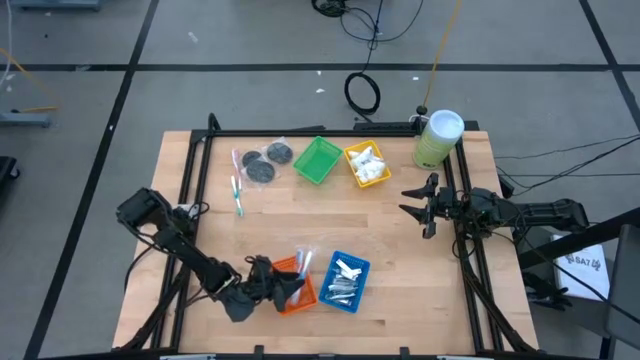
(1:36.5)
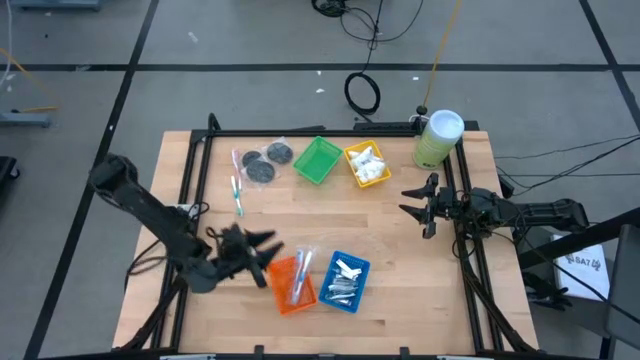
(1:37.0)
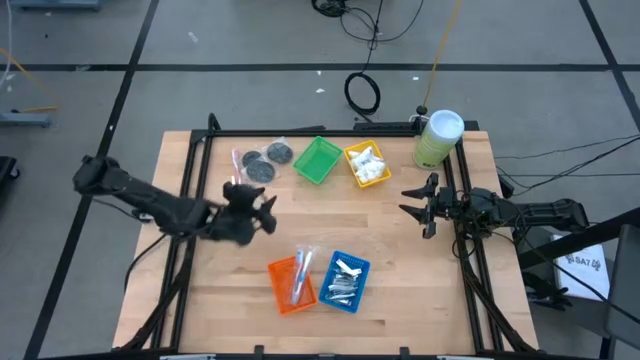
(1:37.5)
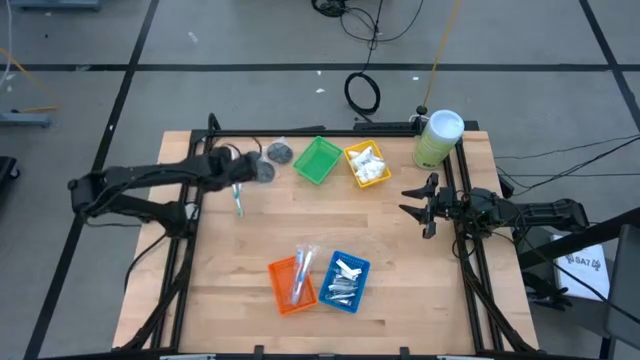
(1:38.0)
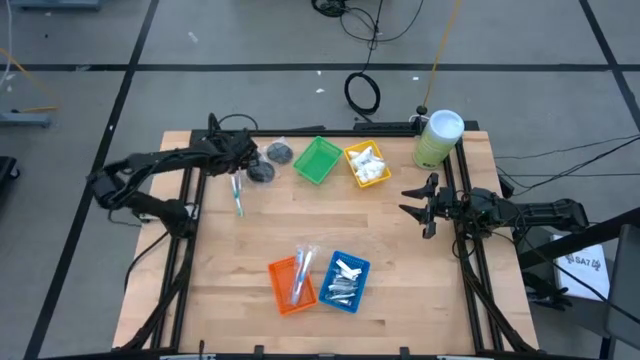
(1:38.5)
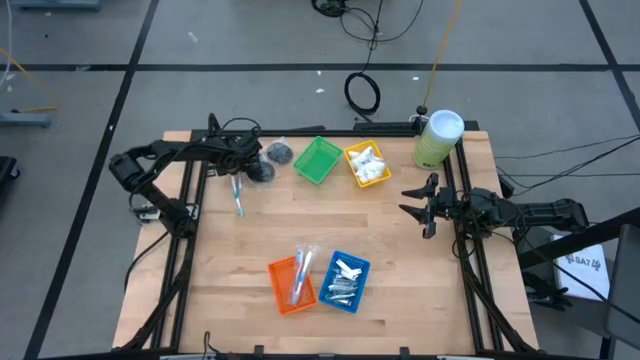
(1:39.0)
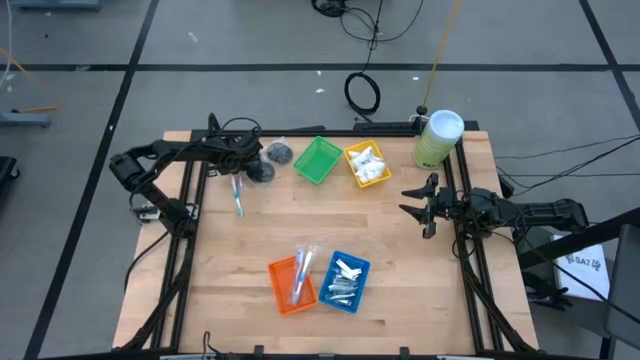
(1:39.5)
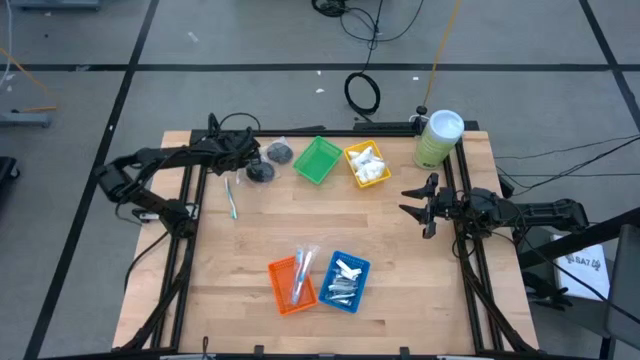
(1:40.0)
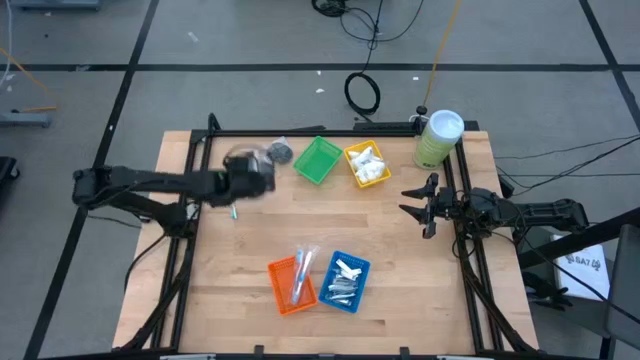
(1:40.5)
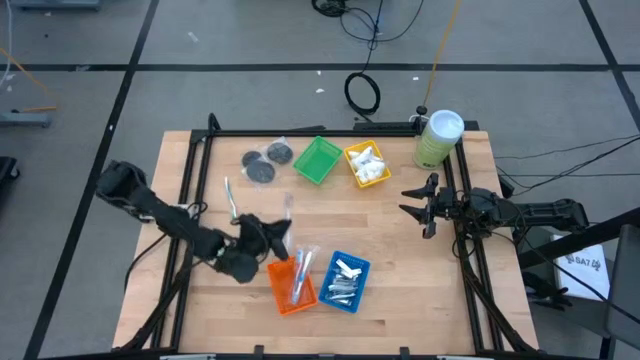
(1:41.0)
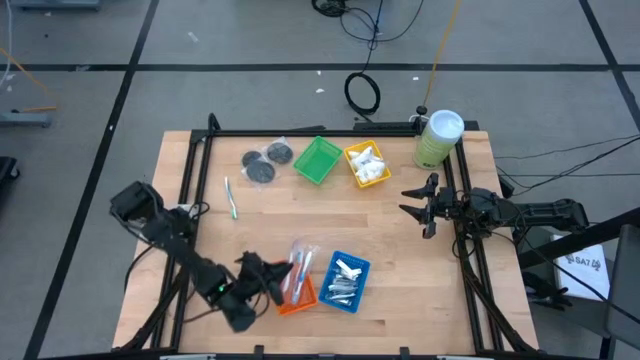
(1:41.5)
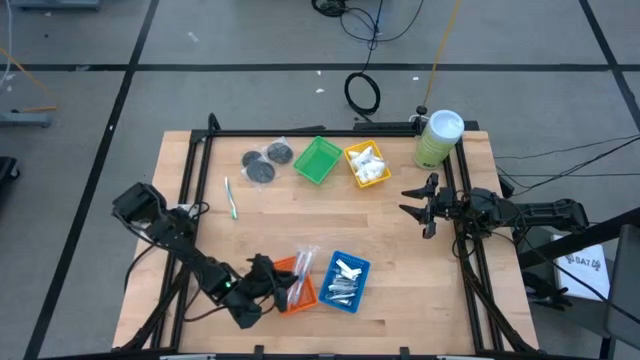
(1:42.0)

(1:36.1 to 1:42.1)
Task: Pick & Place Travel size toiletries
Put the red toothbrush into the orange bin

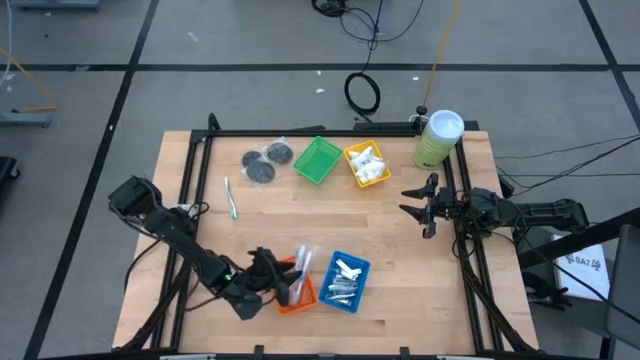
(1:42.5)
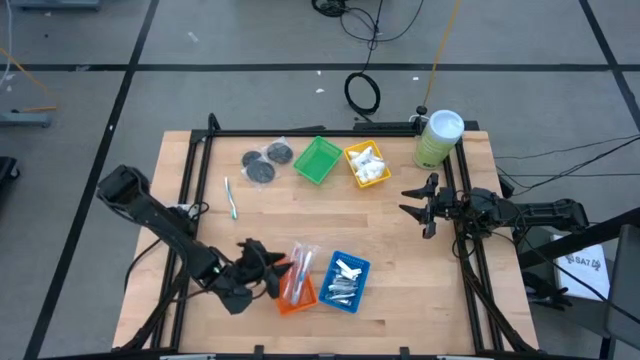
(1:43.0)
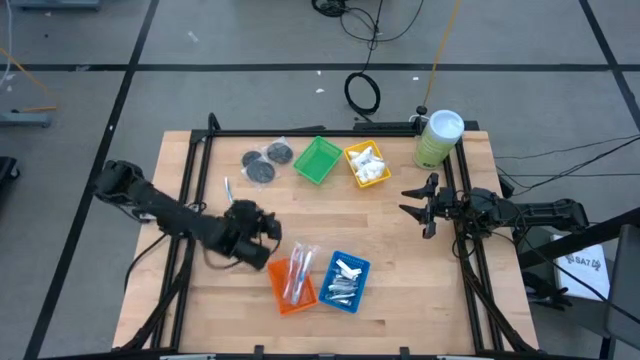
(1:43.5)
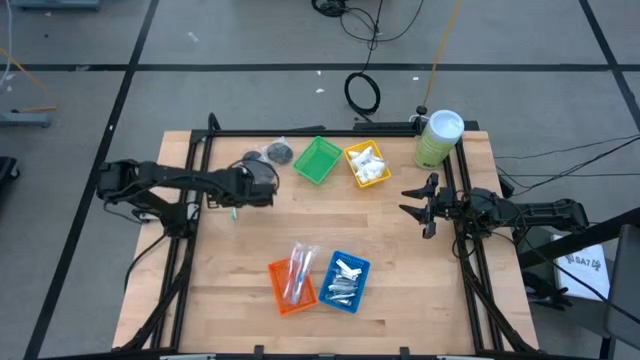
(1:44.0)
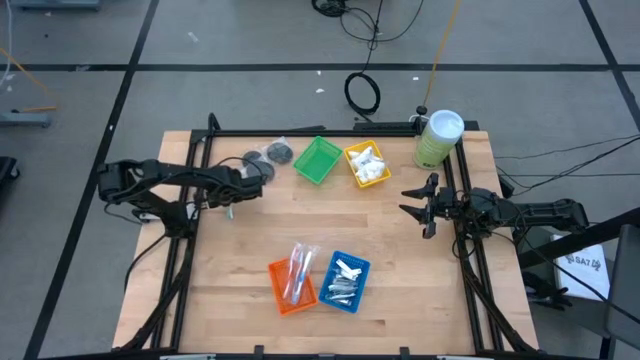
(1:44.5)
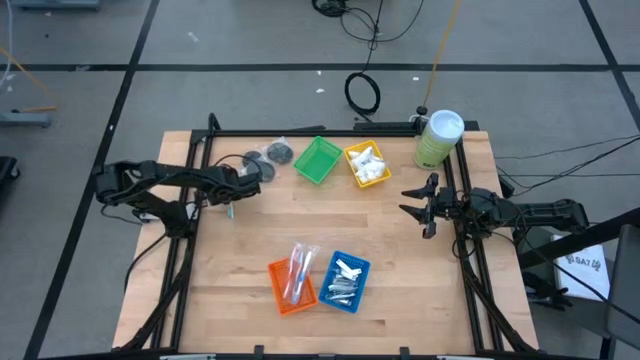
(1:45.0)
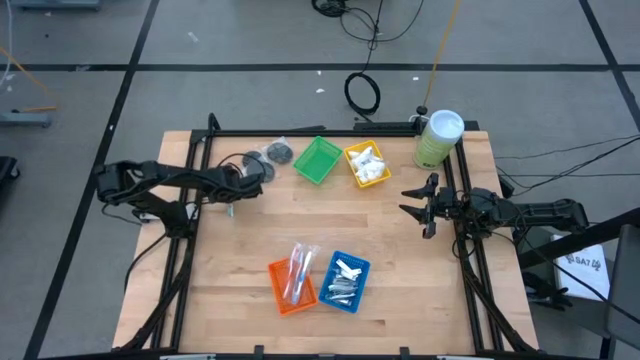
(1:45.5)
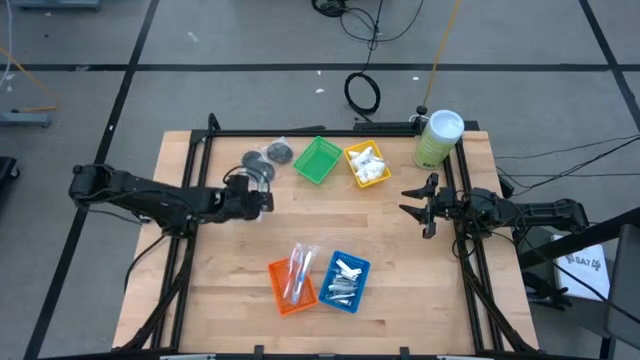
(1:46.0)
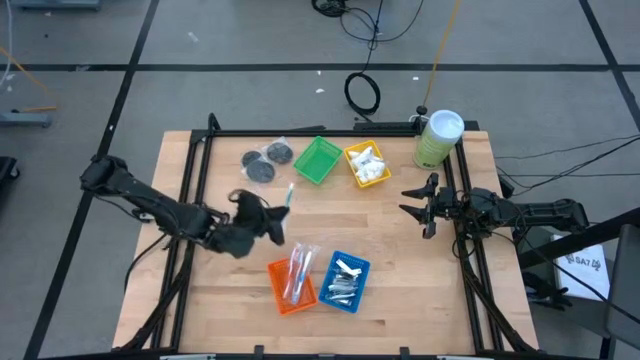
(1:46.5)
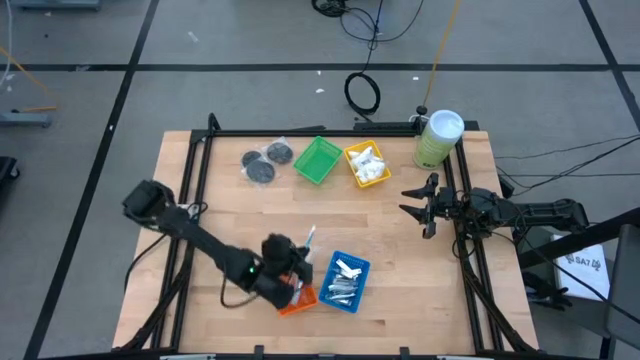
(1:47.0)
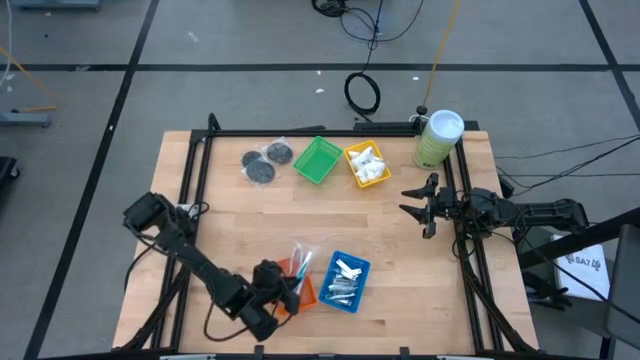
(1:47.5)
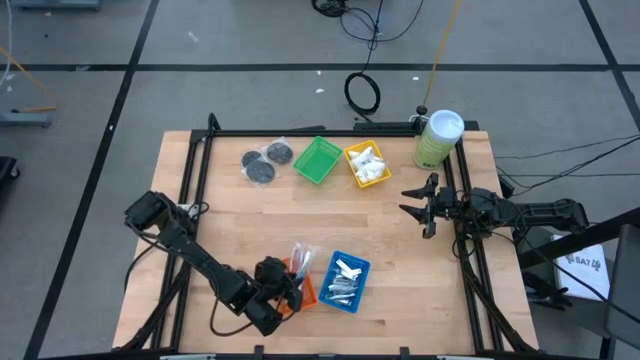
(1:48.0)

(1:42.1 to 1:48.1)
Put the green toothbrush into the orange bin

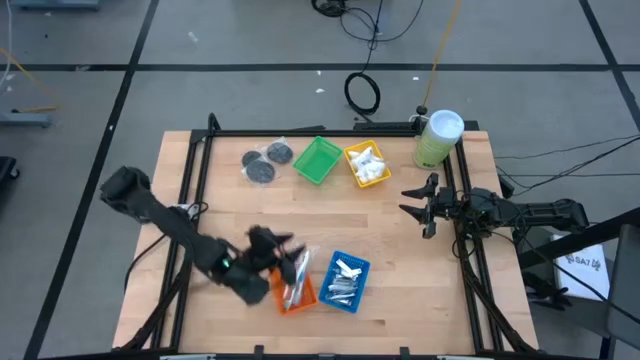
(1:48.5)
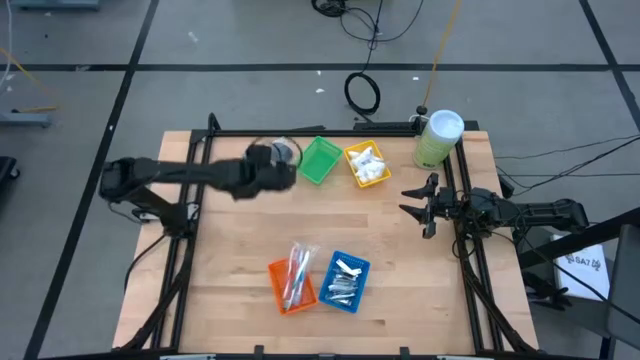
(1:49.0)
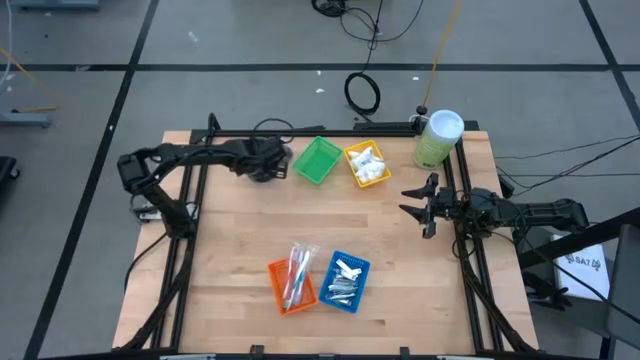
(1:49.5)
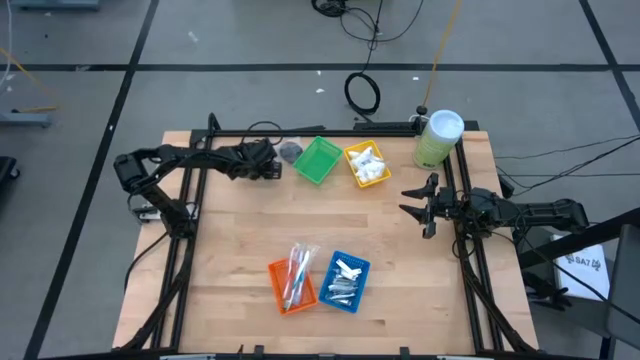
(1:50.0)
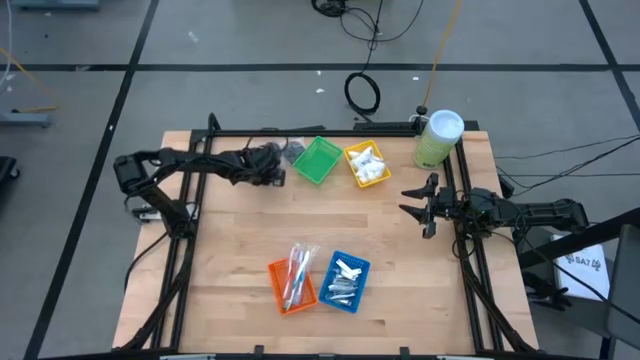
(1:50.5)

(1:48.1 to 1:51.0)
Put the black hairbrush into the green bin

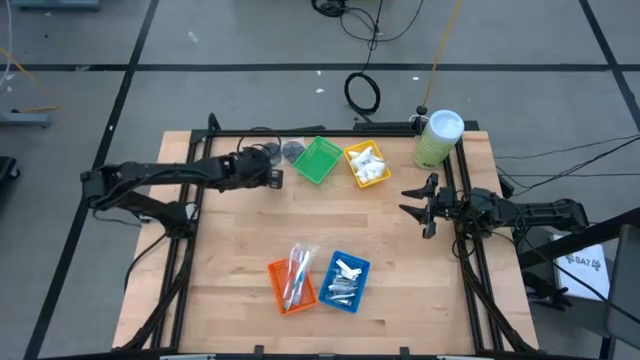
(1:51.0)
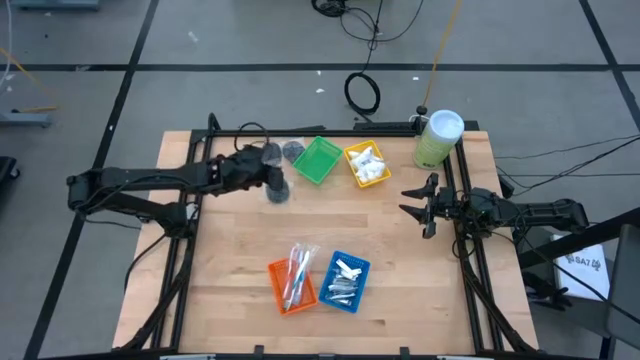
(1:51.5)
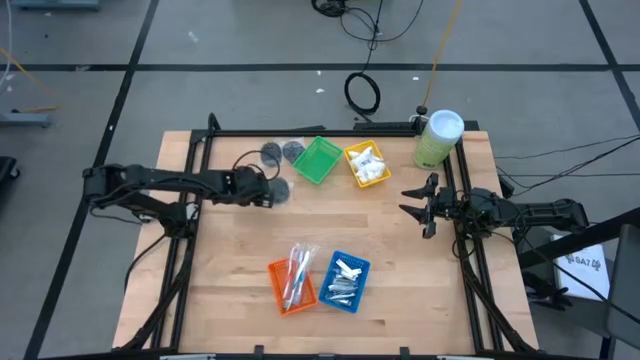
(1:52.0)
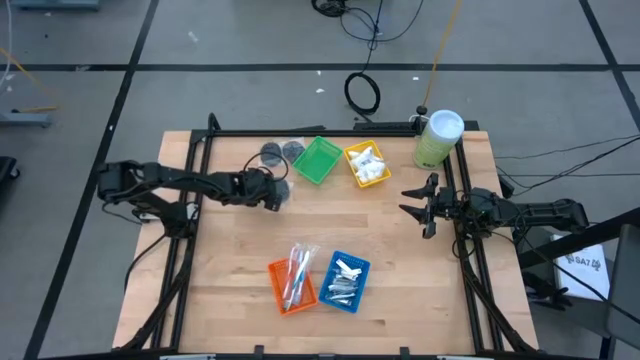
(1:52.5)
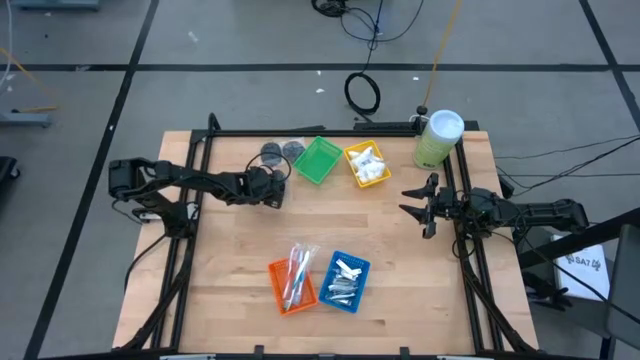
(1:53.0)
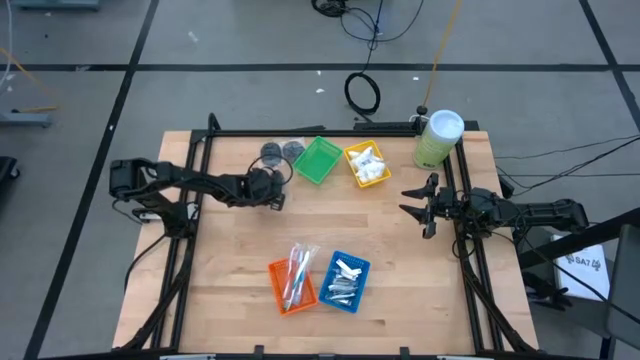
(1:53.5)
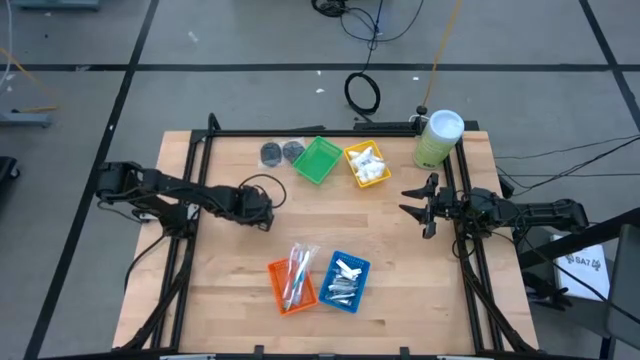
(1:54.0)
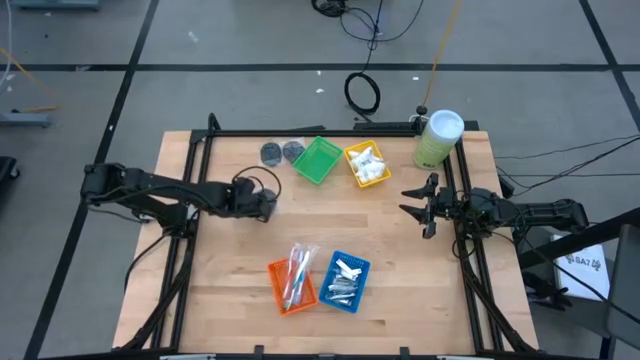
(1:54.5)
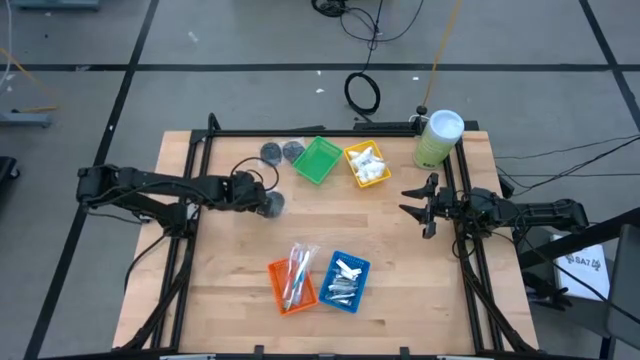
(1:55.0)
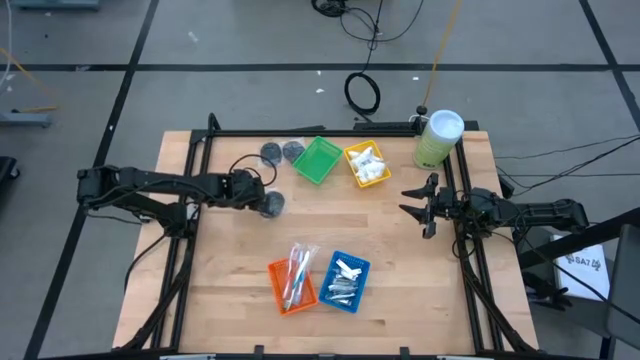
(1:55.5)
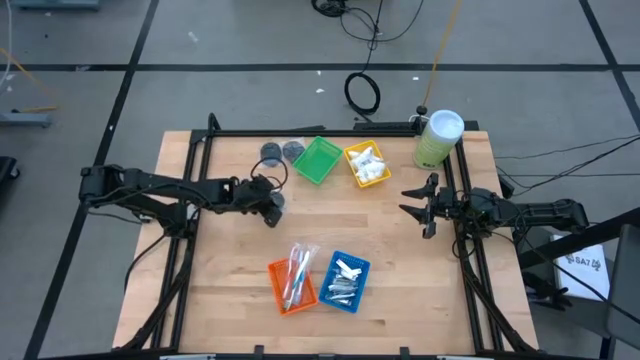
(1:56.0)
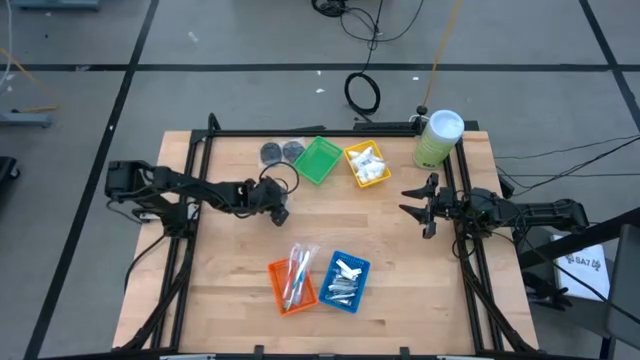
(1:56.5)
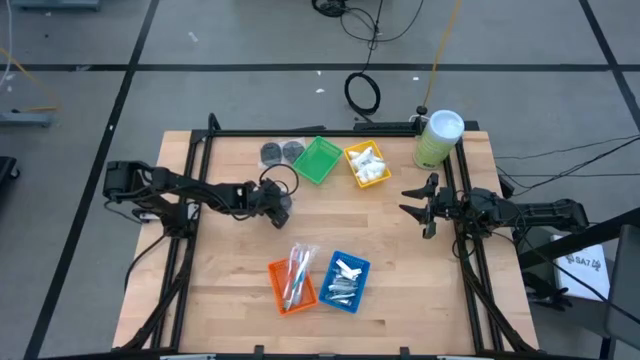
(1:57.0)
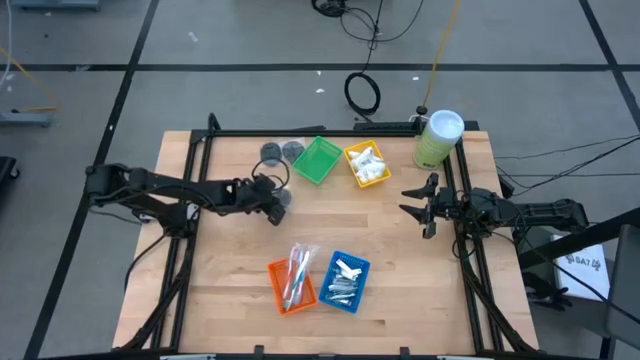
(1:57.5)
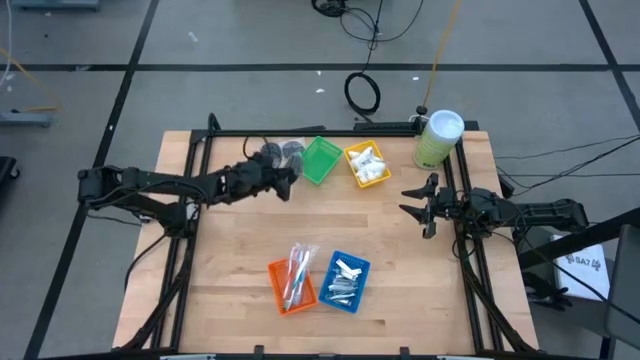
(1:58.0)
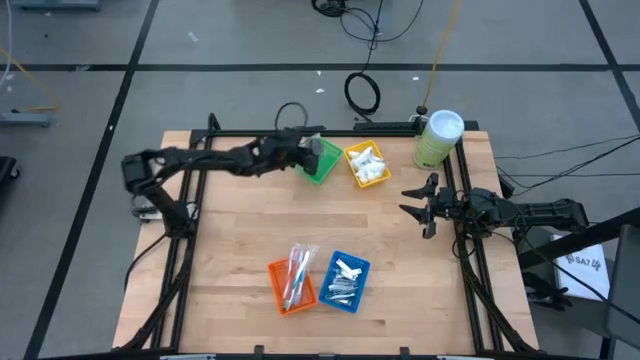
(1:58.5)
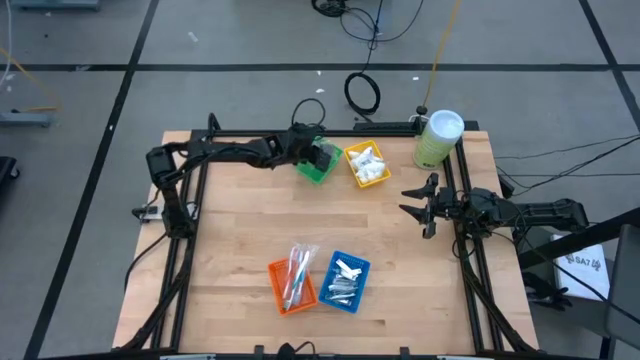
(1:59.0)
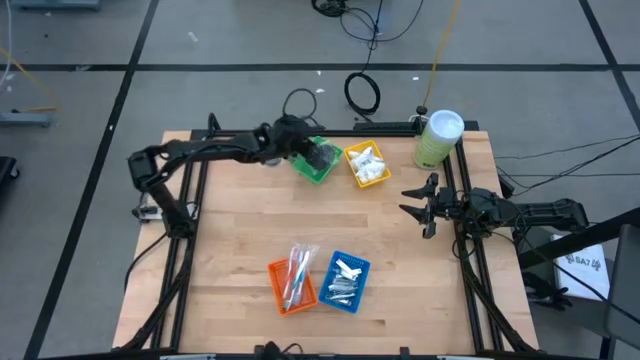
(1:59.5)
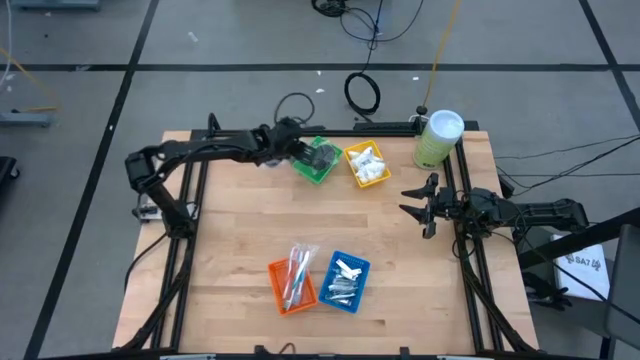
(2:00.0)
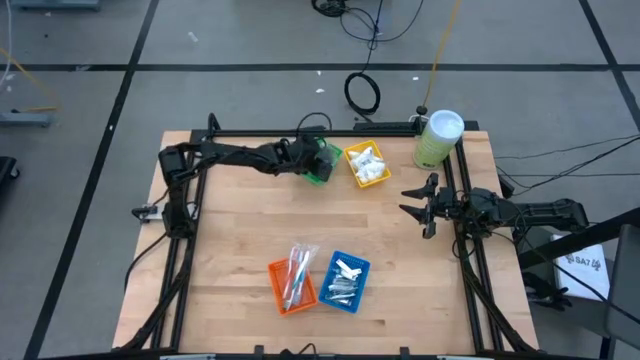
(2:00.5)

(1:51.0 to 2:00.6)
Put the black hairbrush into the green bin
